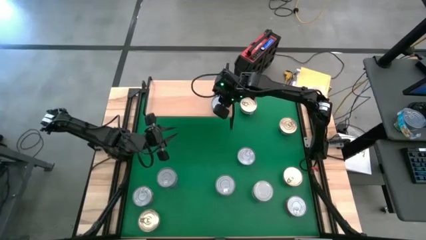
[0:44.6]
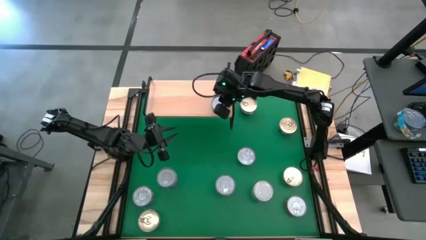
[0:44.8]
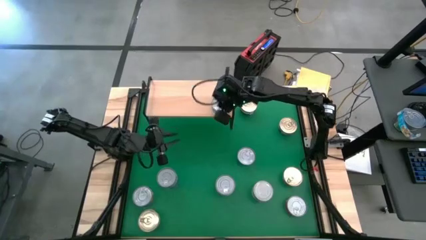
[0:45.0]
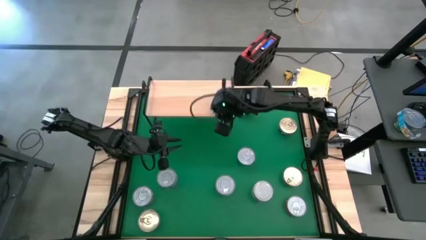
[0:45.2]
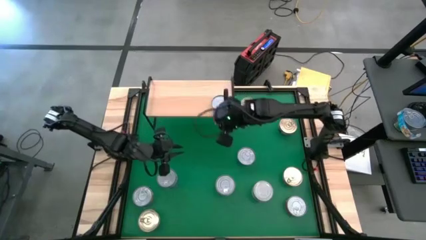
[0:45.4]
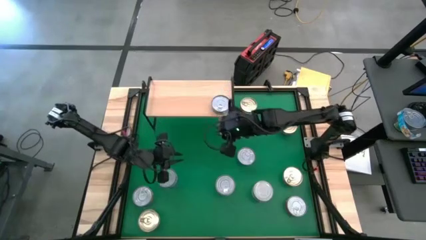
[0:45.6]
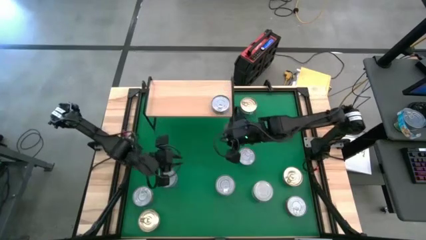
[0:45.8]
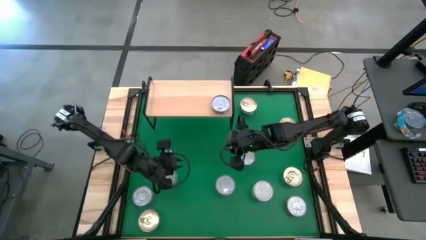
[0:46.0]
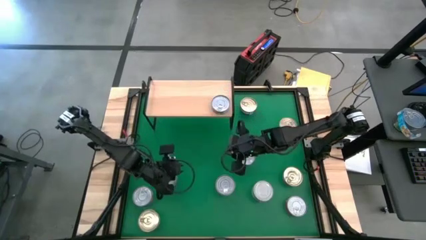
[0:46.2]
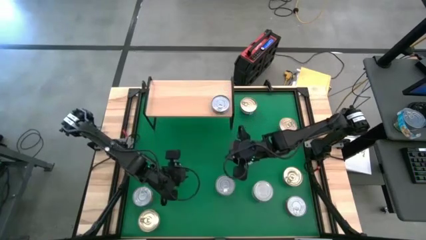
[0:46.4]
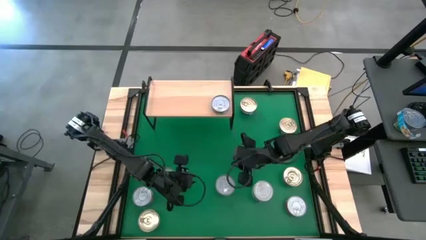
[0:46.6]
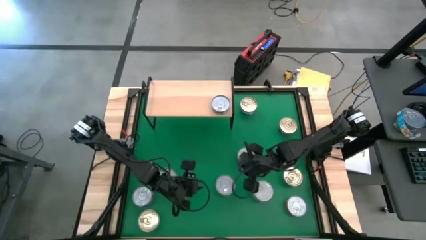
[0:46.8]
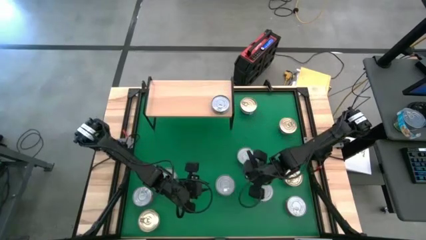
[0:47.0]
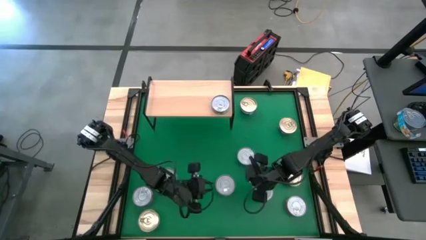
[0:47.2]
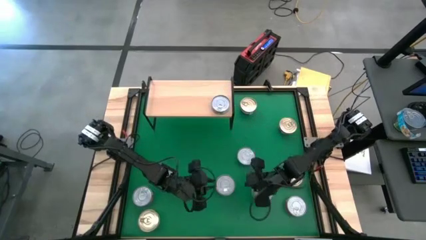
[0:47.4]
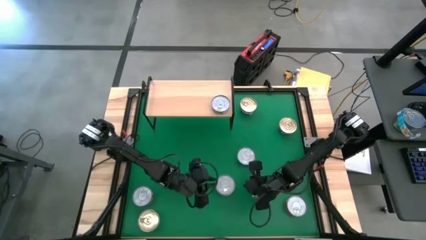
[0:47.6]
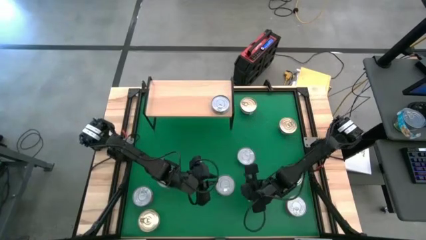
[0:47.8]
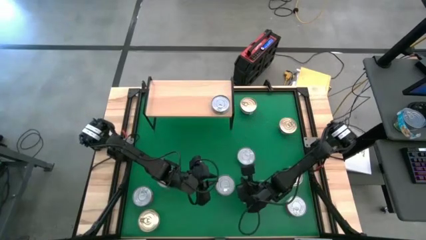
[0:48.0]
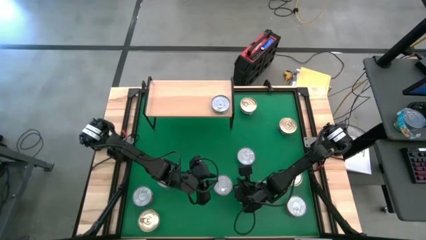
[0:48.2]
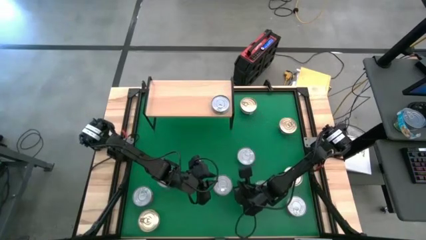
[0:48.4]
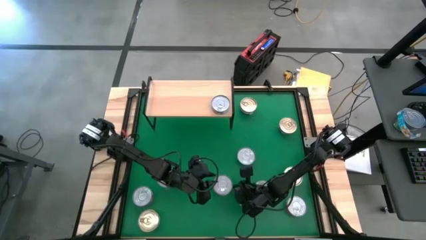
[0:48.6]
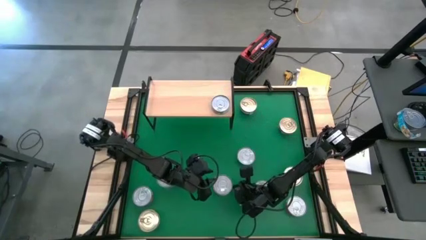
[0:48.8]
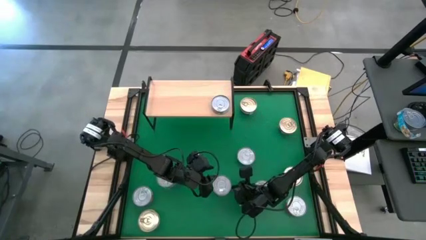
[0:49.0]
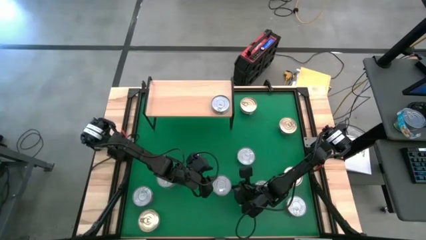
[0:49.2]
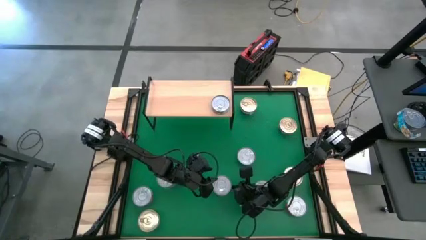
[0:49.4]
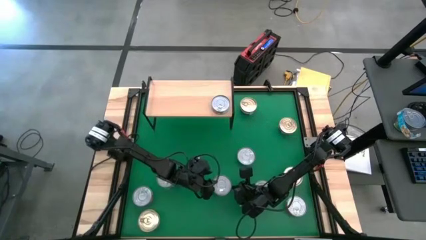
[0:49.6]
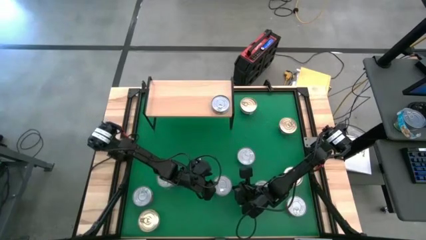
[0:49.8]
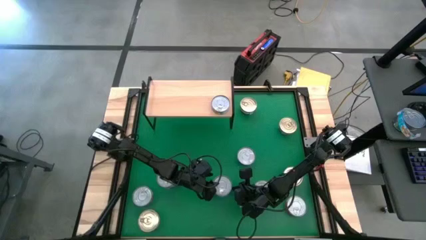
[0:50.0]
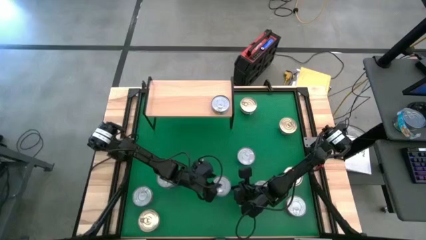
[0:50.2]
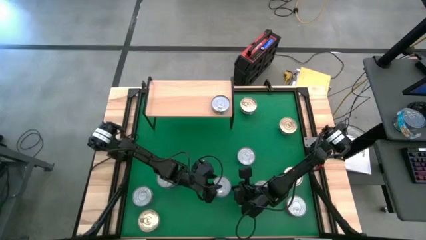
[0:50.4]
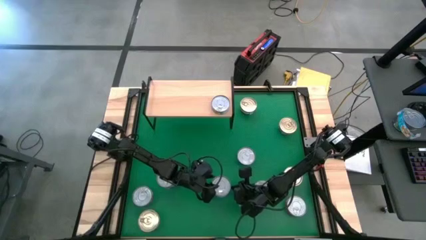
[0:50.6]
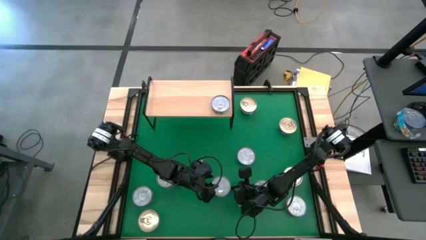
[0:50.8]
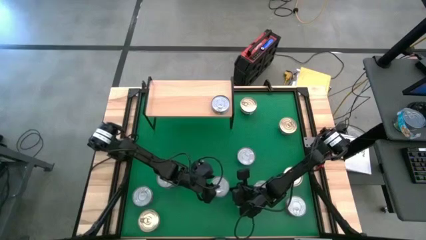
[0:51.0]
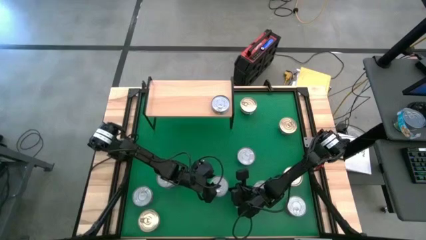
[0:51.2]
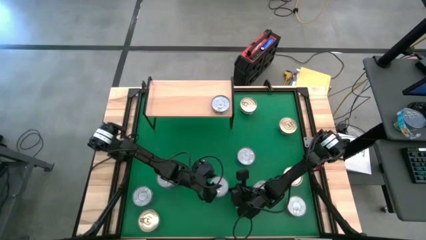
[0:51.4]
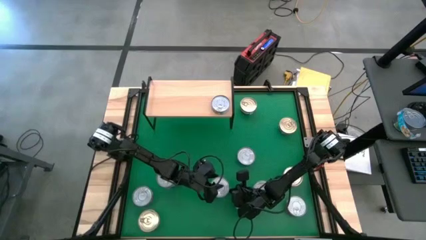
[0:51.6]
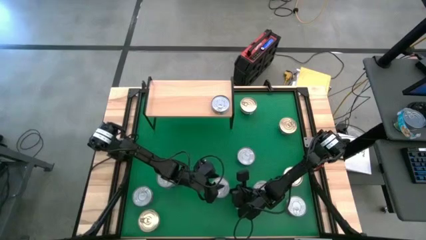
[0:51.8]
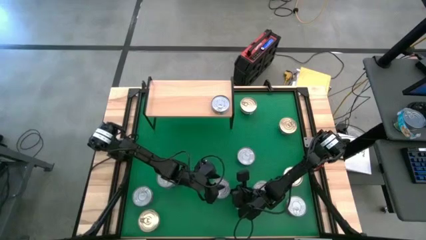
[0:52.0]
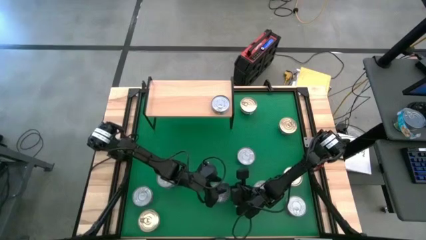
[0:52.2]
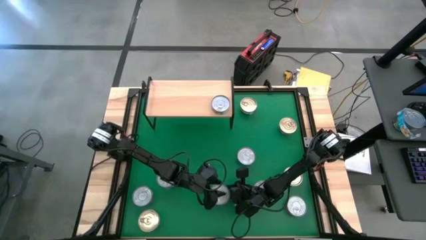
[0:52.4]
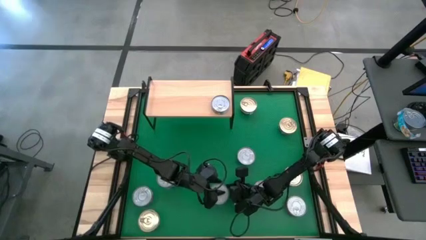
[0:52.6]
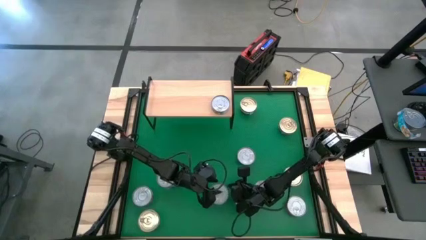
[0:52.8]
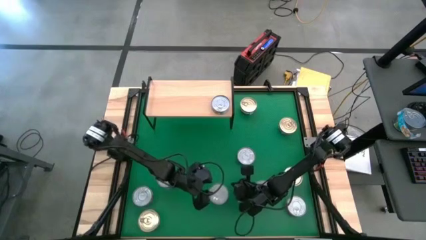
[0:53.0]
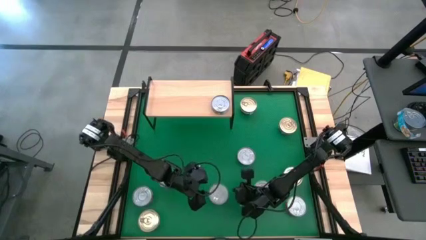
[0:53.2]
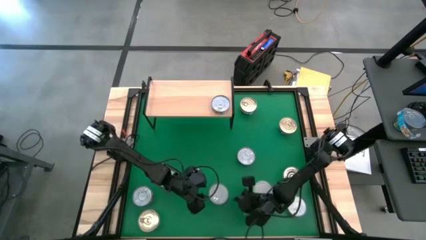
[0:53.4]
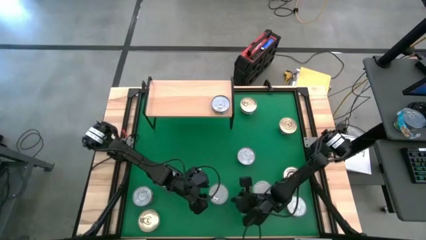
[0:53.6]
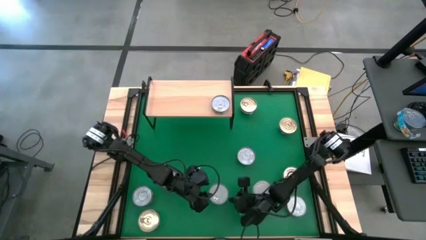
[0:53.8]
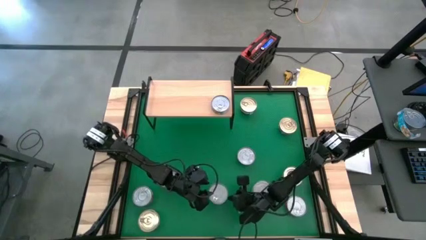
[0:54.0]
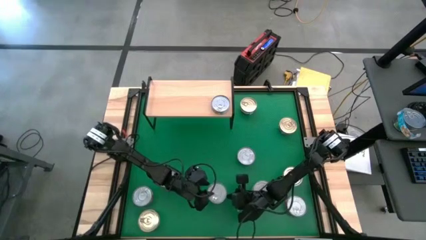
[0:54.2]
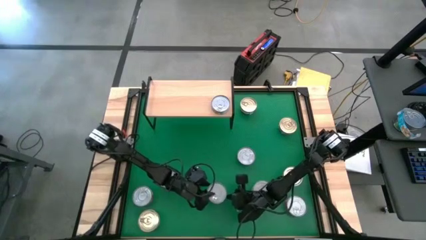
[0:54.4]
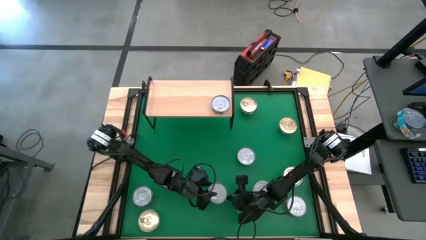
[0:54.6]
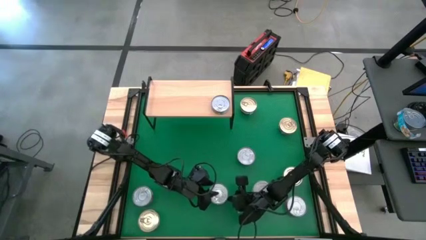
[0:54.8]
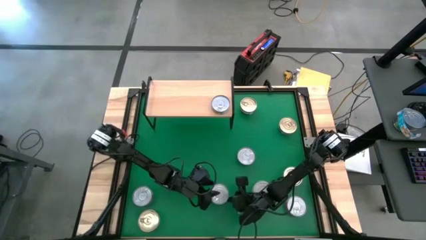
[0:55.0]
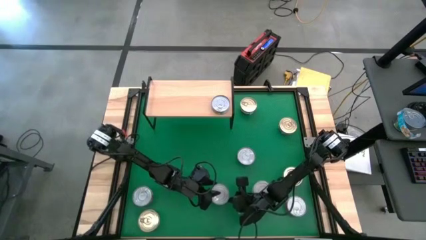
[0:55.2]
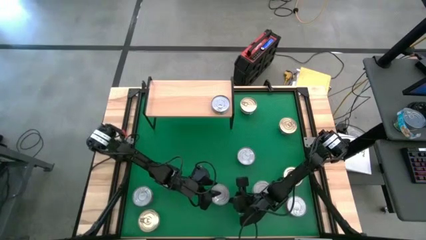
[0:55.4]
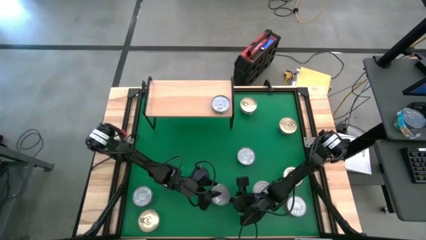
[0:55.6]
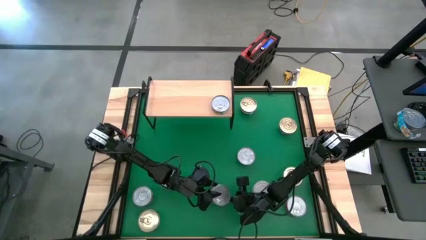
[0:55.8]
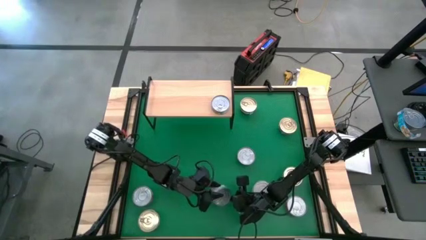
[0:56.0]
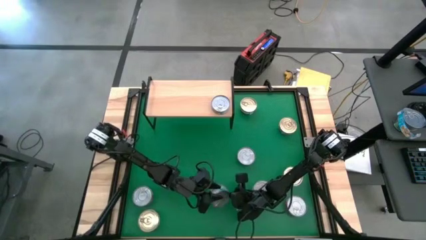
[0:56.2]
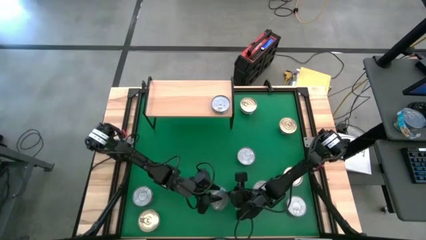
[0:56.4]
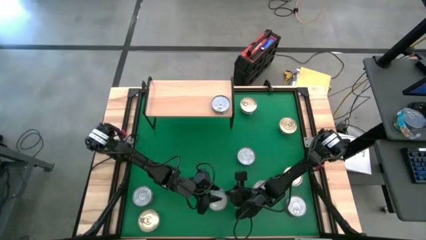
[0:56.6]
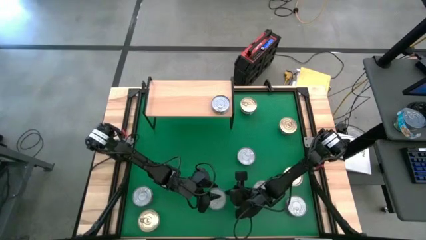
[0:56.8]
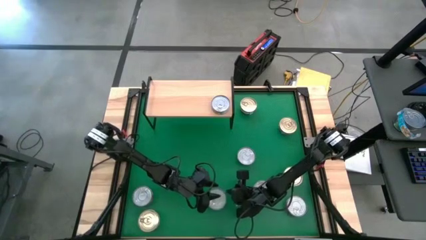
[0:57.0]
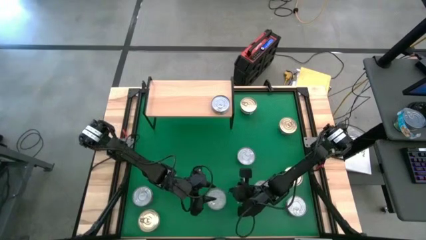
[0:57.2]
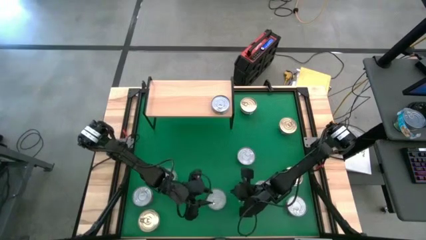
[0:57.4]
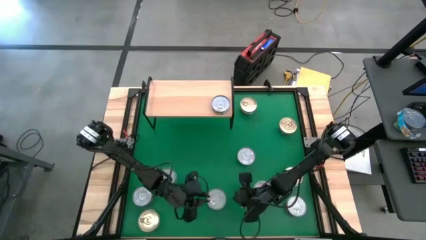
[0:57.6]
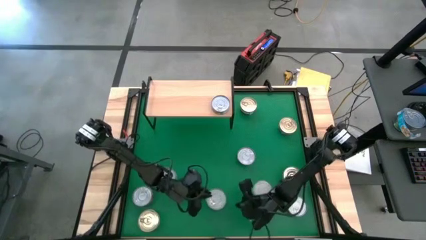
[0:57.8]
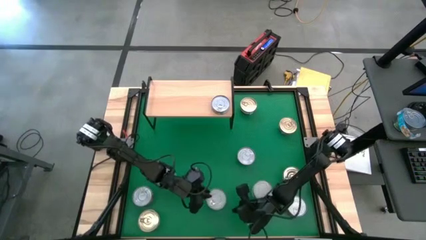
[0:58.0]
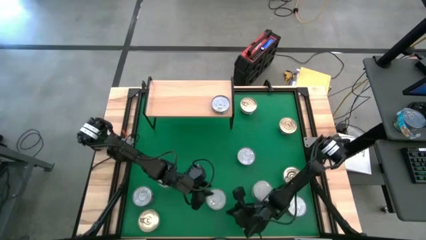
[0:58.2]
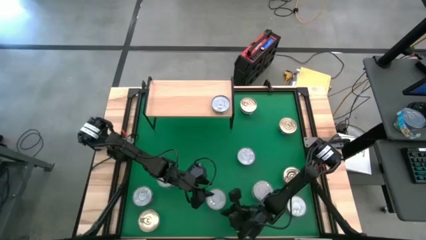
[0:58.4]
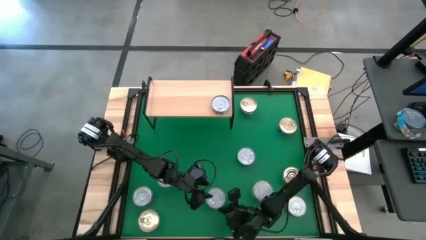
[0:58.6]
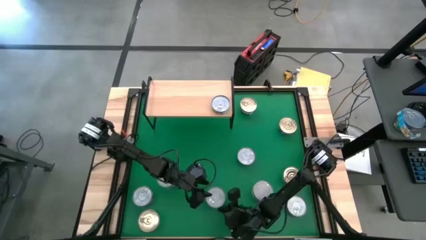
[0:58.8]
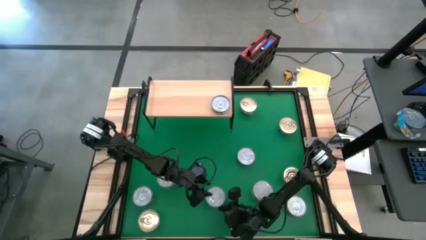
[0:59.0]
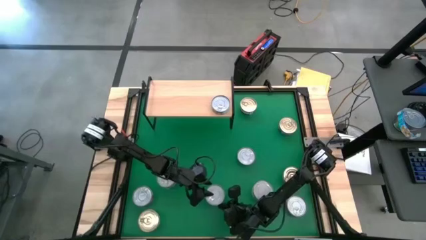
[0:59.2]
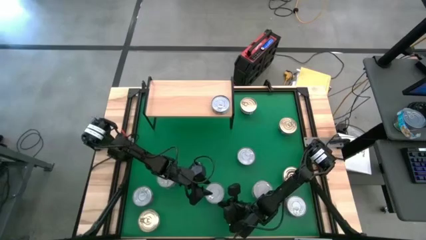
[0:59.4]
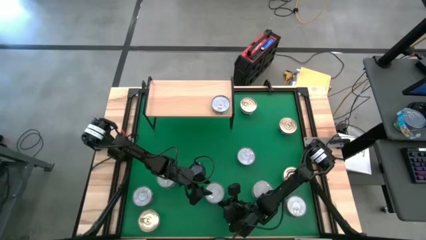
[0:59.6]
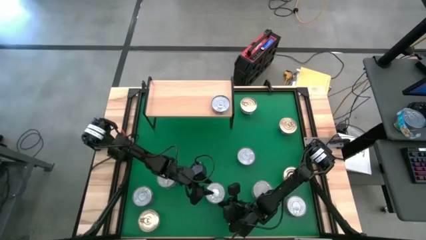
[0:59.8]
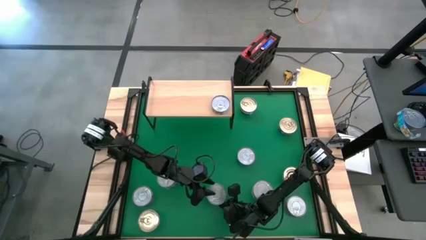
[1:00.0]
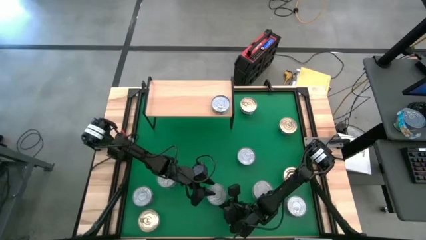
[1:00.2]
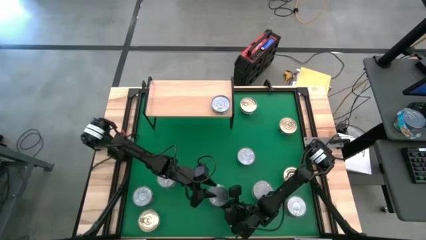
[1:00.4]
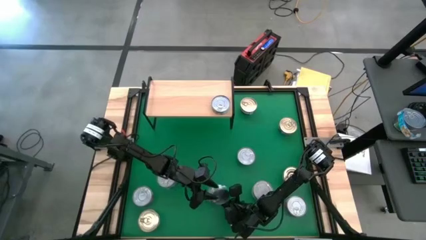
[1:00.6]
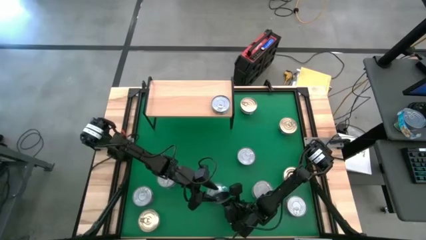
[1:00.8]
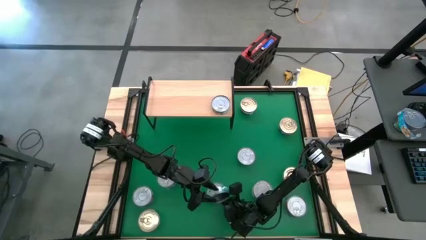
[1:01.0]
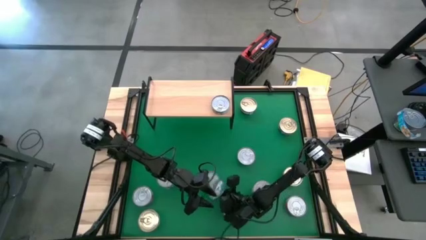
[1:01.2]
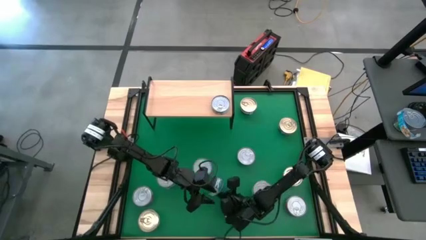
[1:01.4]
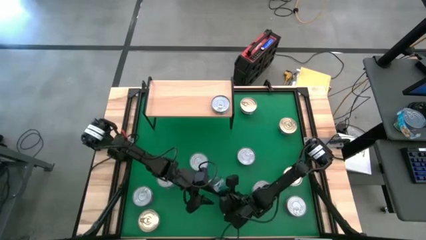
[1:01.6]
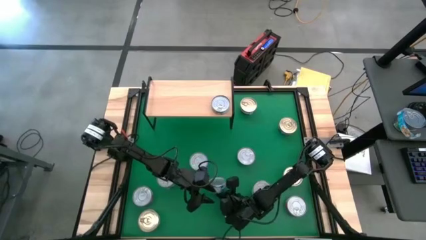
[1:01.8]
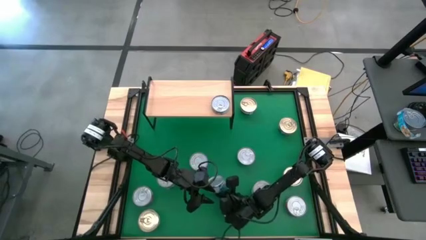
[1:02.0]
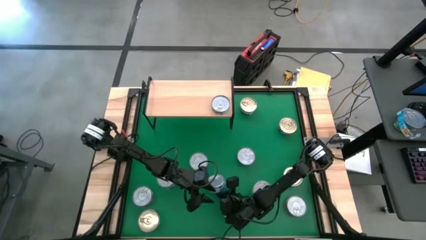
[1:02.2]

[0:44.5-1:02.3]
Task: Stack canned seafood by type on shelf
Put the center light blue tuna can on the shelf
